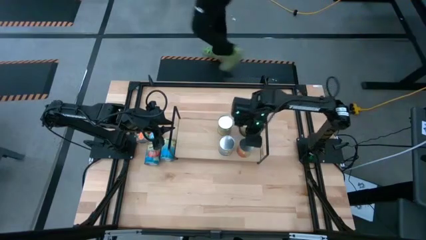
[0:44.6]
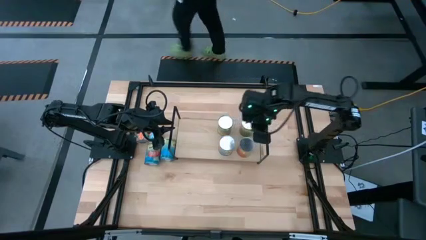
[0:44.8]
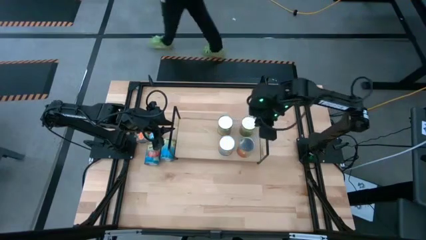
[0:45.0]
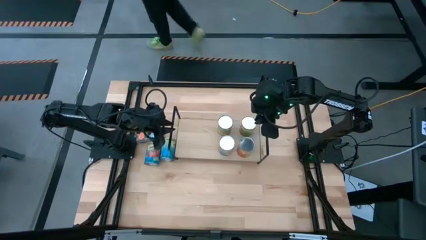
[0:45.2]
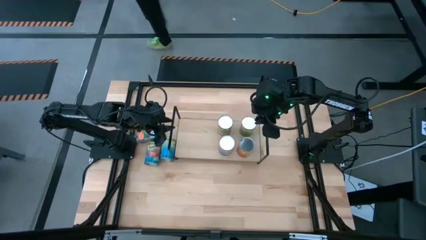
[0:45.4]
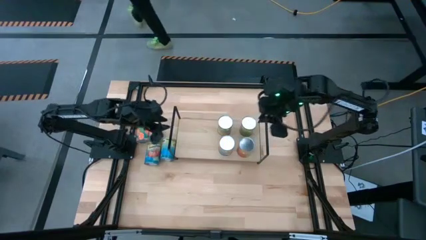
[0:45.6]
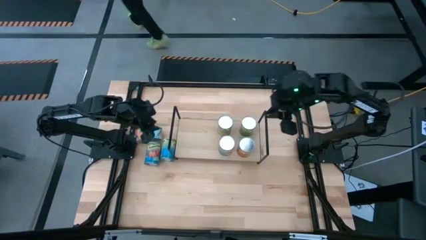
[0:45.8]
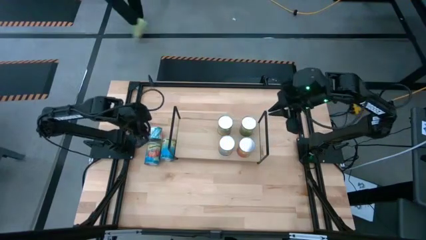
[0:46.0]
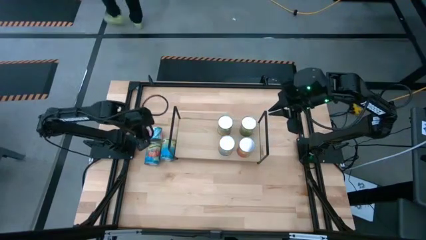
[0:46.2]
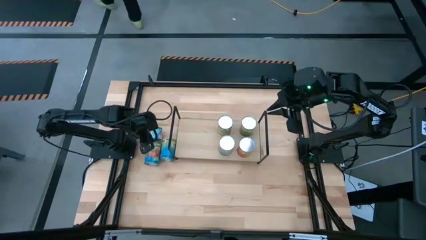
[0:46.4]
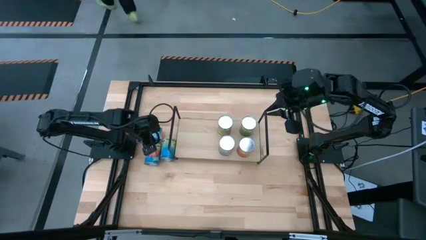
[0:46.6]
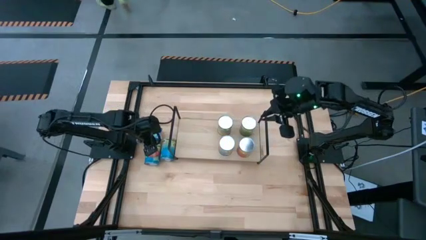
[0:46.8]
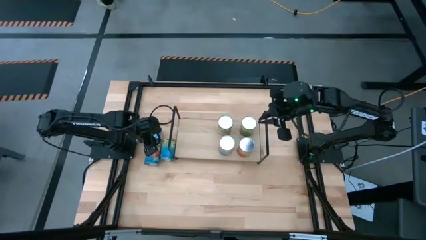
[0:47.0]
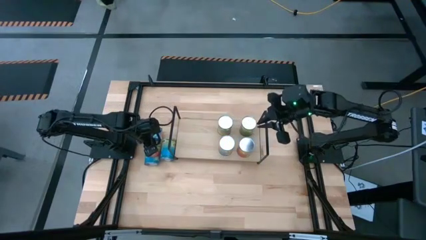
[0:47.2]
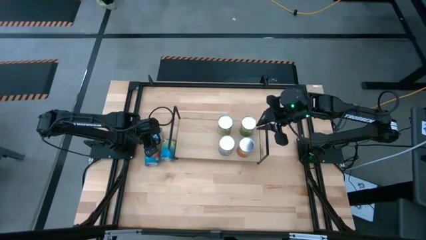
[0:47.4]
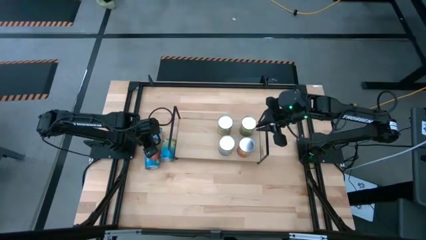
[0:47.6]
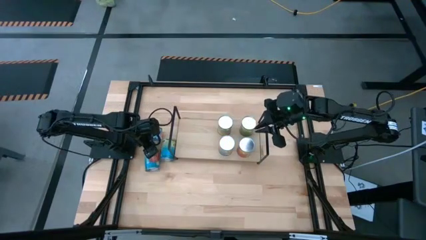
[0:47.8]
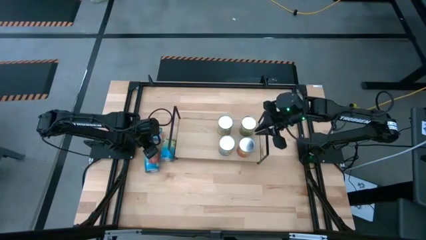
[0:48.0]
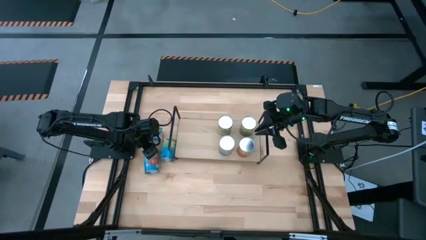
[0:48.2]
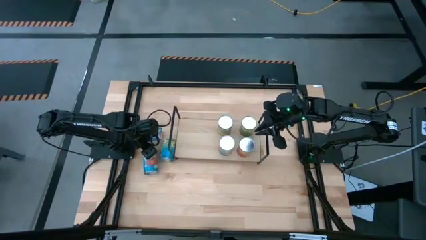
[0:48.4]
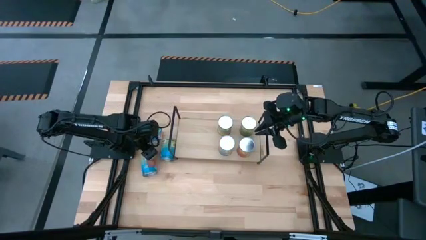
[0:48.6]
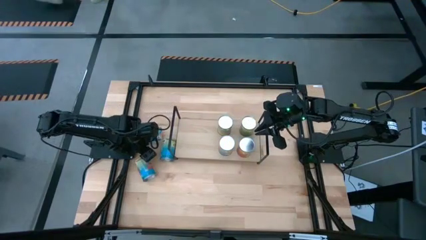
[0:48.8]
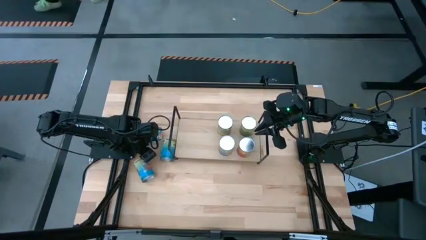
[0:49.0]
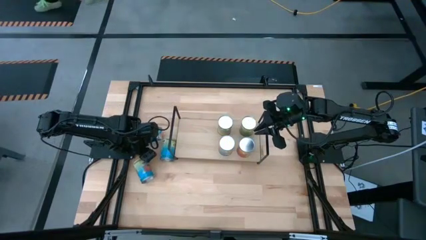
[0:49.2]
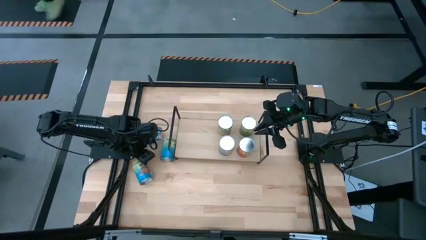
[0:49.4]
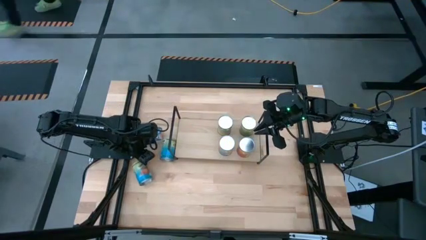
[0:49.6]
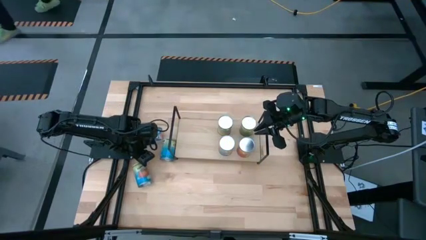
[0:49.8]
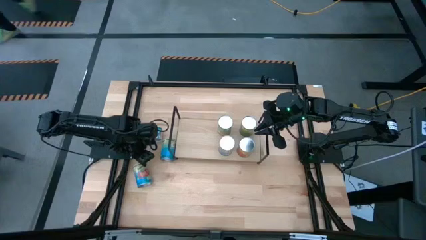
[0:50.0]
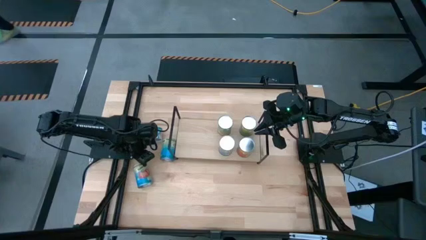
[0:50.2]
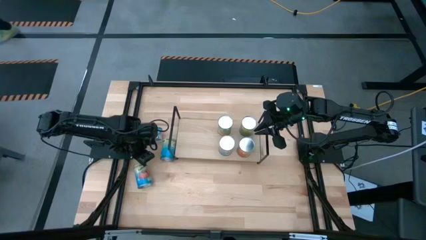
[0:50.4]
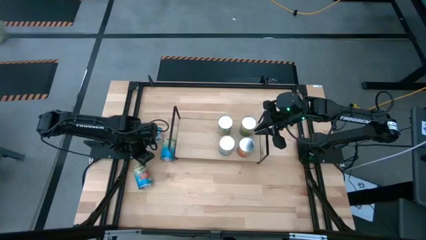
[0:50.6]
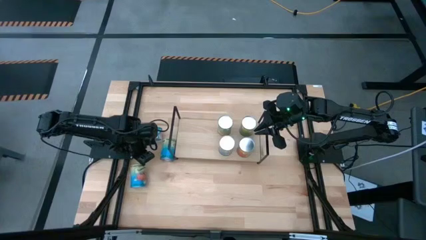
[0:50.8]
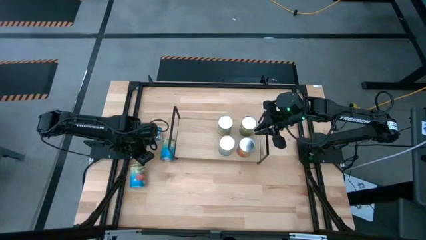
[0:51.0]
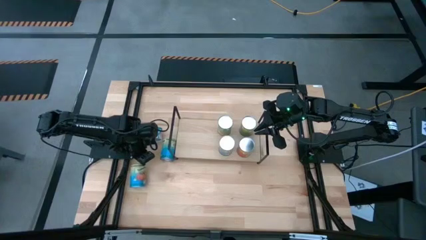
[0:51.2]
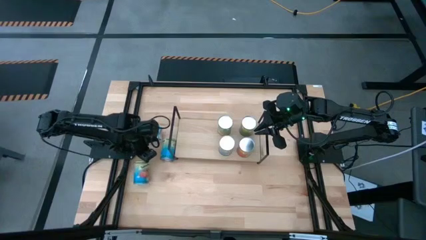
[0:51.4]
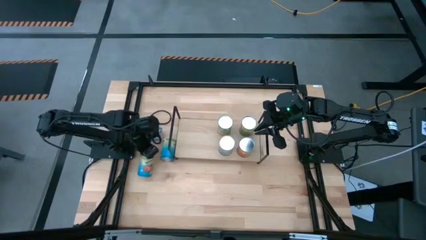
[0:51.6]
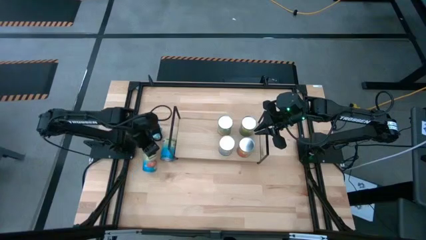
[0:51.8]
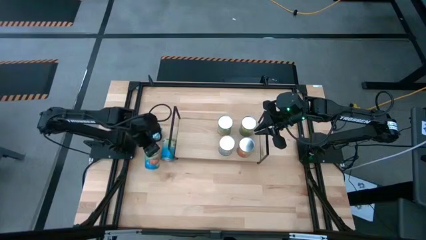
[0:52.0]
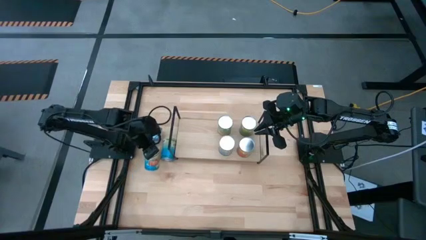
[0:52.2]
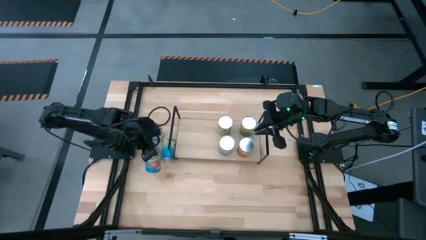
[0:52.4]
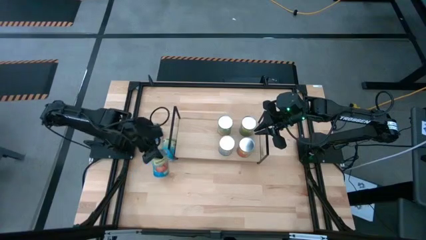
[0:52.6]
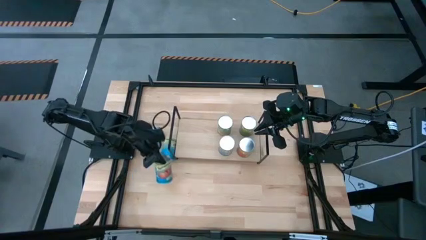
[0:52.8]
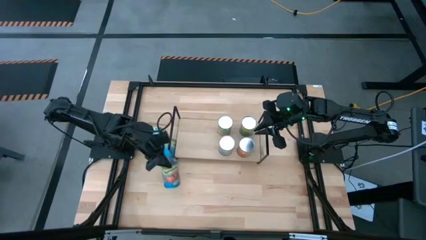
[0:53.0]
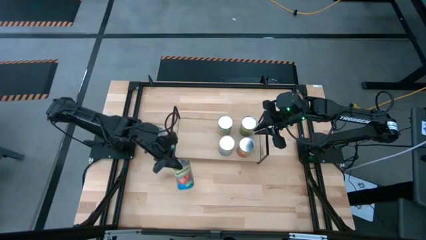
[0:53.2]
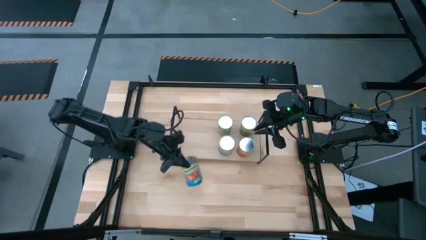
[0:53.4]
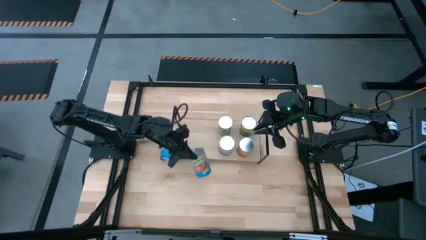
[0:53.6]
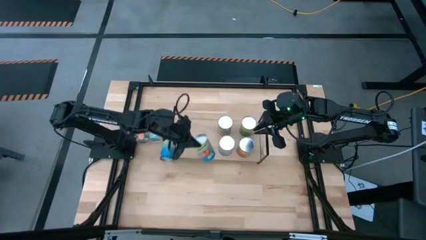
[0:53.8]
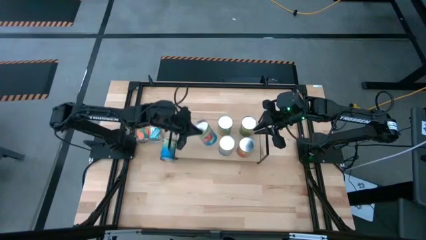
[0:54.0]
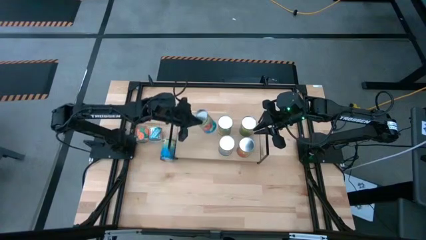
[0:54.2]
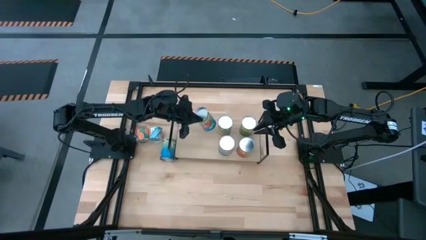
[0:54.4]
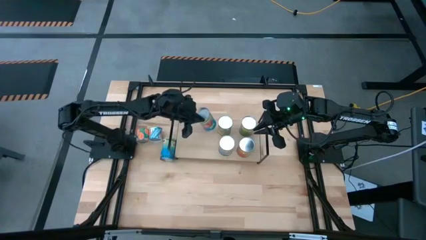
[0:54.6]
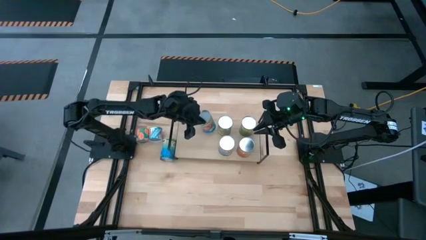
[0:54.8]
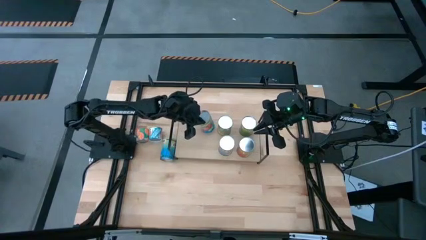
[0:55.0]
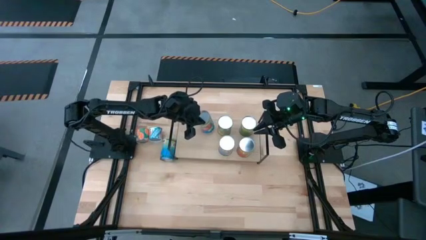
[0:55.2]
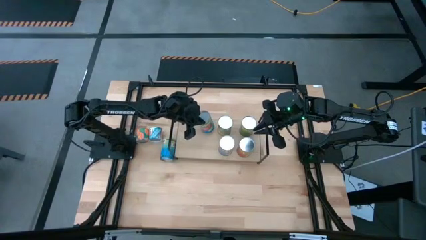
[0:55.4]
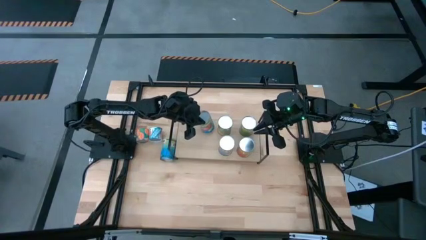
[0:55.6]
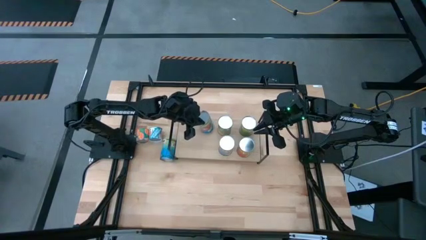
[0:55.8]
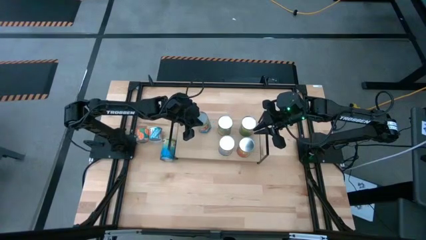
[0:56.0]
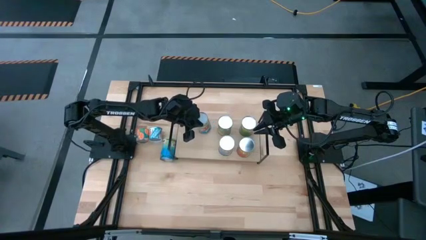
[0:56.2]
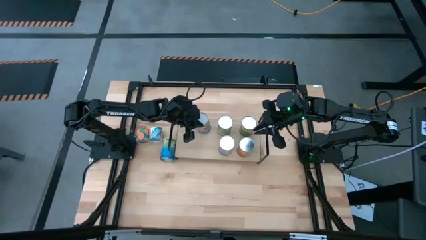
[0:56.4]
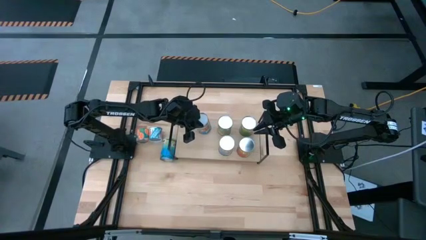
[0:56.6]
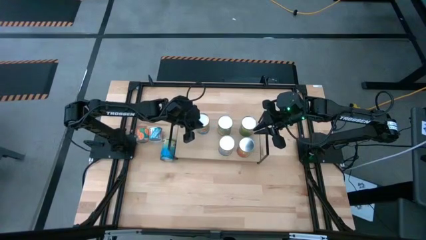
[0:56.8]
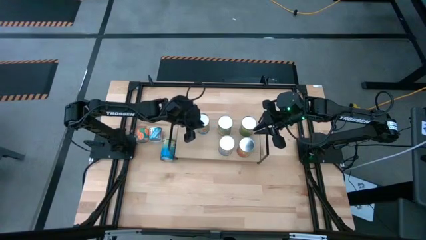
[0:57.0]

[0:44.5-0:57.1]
Task: Pick and place cans onto a shelf
Put the canned tomatoes on the shelf

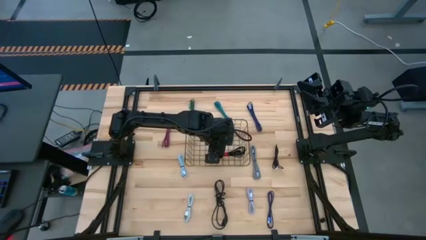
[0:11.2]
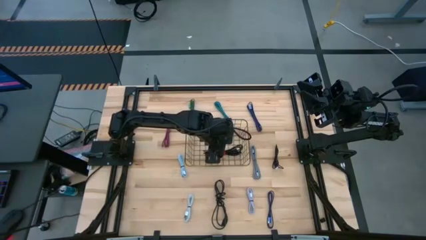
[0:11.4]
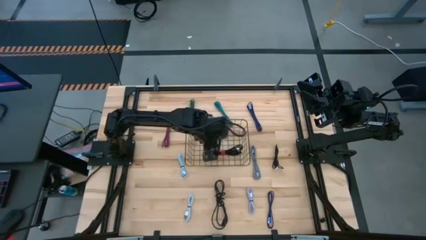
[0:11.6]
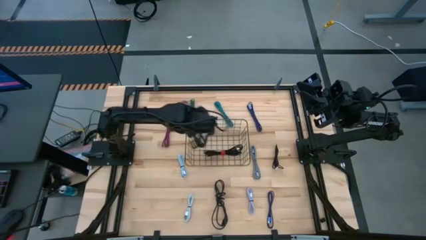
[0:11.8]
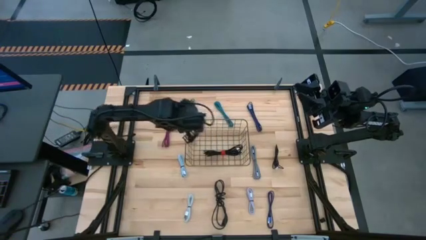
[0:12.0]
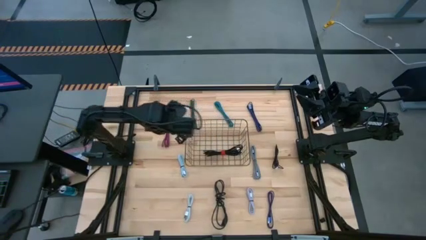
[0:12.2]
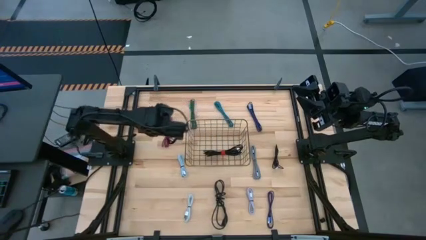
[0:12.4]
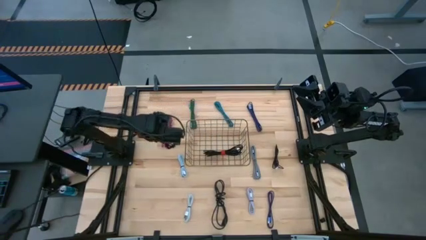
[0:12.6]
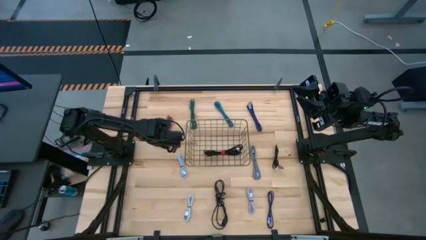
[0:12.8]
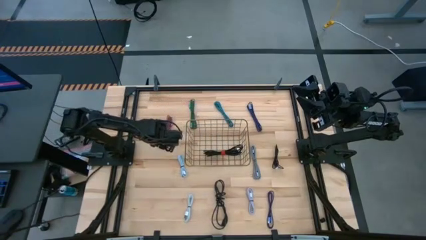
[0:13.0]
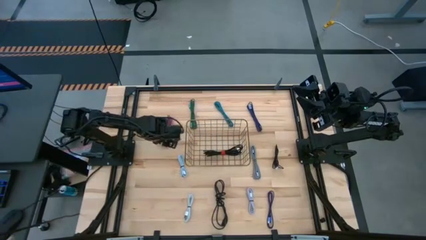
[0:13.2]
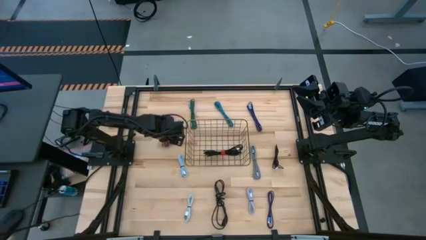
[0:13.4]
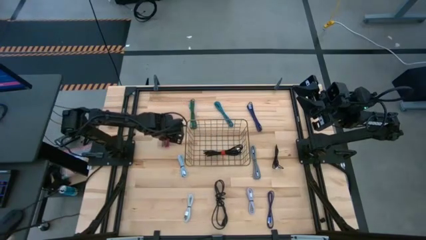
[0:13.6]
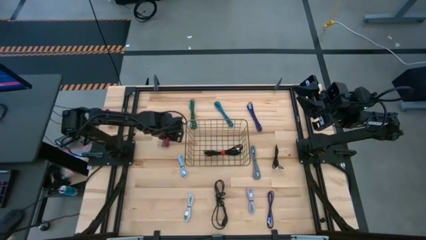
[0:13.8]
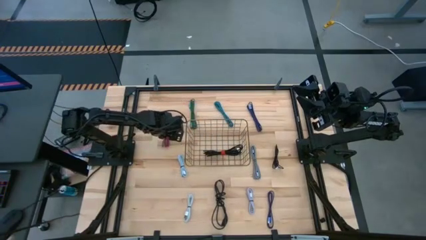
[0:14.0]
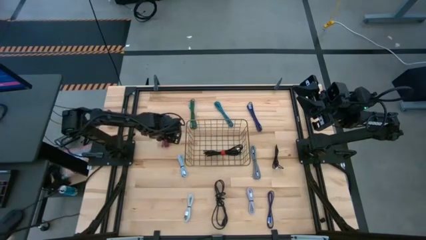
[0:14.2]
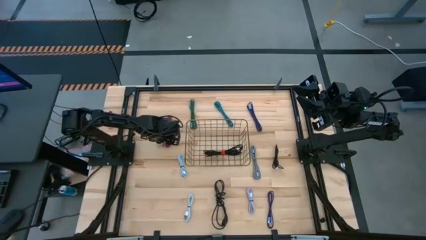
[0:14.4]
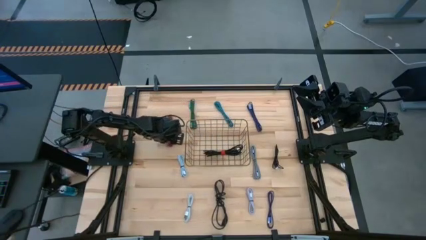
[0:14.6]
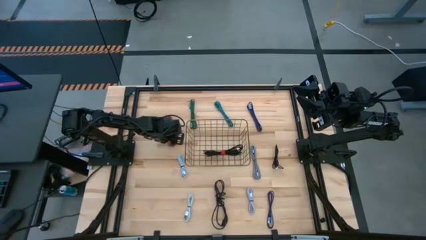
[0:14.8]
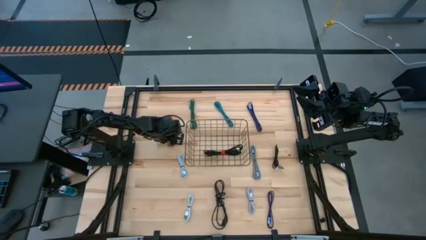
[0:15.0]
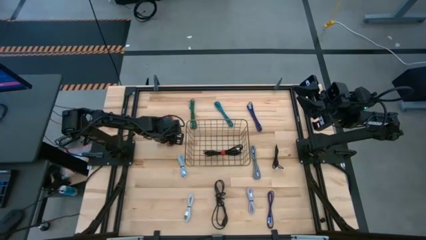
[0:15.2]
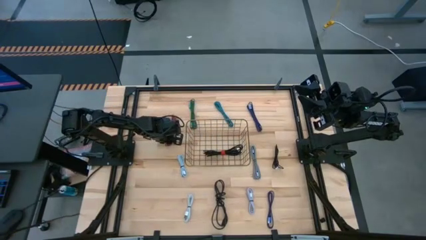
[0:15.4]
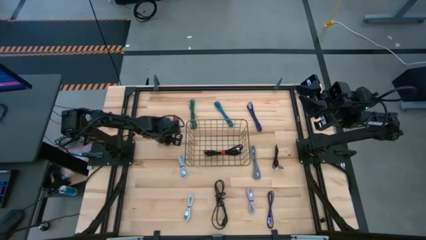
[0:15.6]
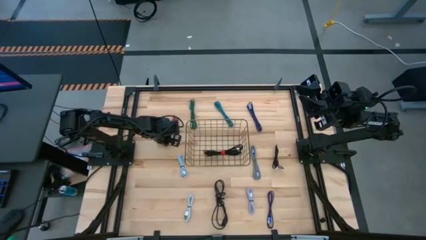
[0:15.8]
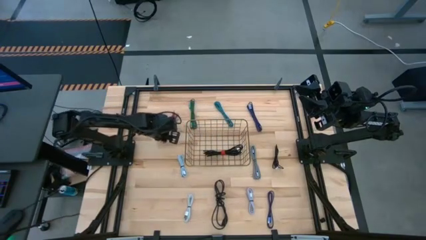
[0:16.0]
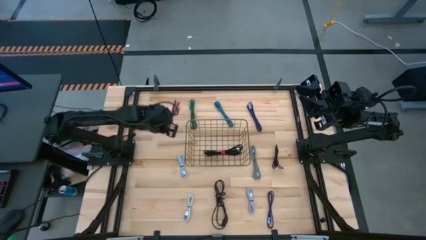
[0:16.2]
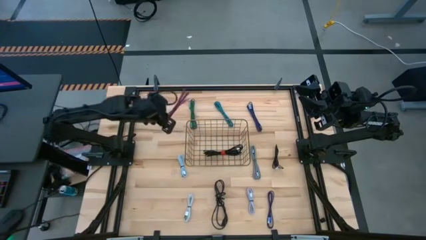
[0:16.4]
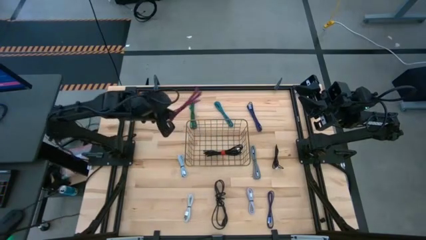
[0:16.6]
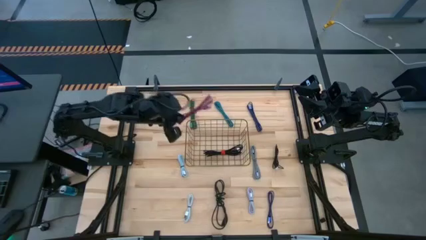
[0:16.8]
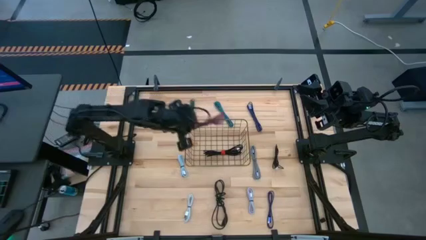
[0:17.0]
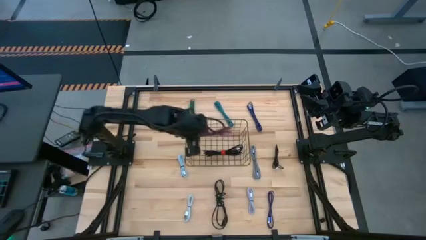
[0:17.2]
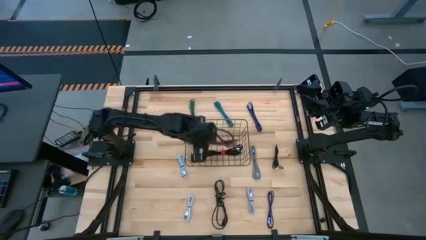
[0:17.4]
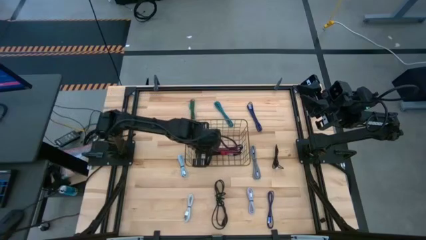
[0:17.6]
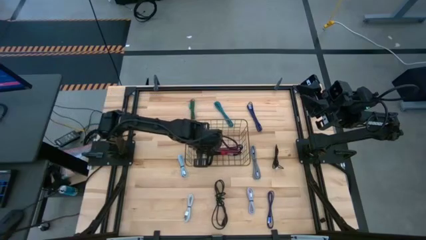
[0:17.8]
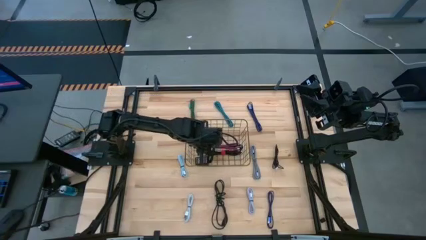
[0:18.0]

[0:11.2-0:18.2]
Task: Pick and place USB-C Cables
Put the pink USB cable into the gold wire basket
